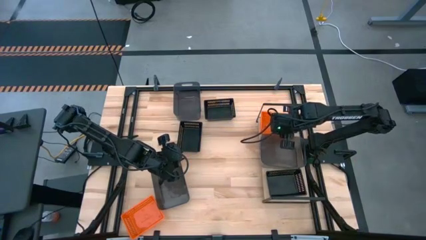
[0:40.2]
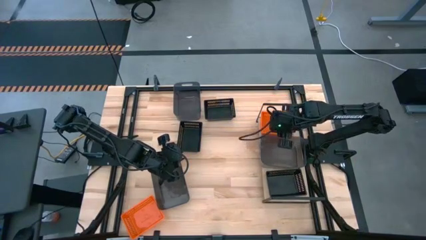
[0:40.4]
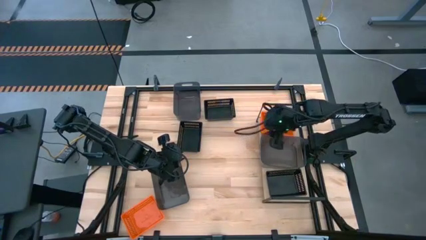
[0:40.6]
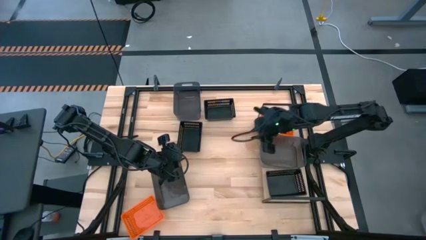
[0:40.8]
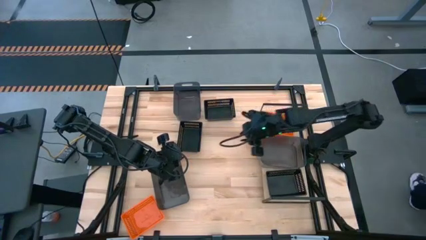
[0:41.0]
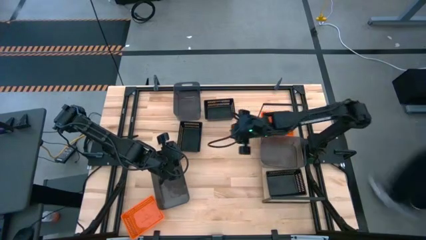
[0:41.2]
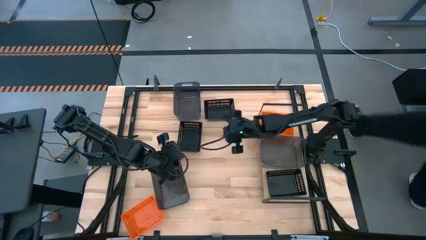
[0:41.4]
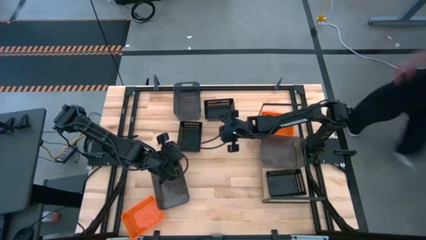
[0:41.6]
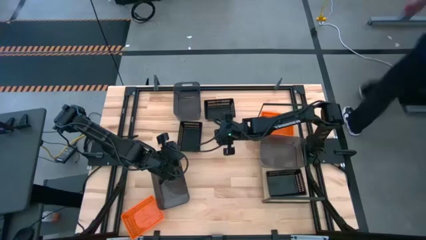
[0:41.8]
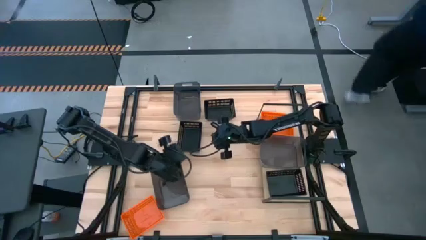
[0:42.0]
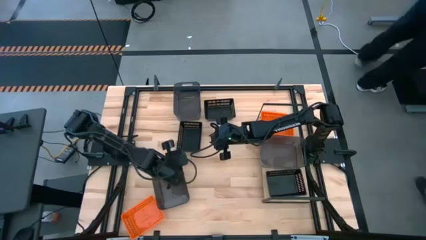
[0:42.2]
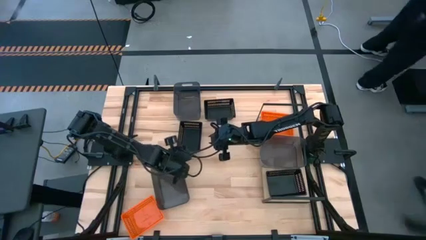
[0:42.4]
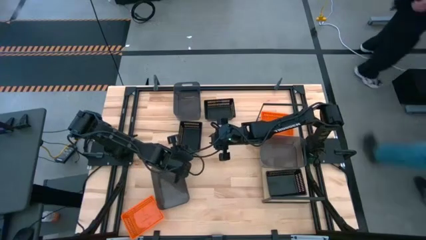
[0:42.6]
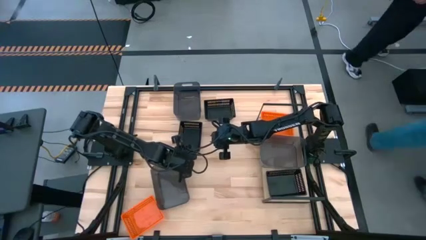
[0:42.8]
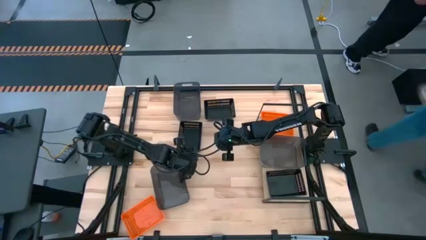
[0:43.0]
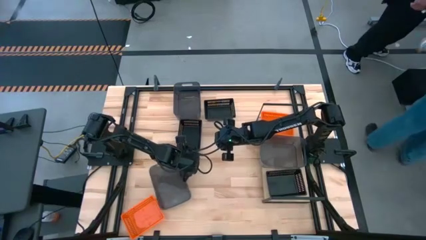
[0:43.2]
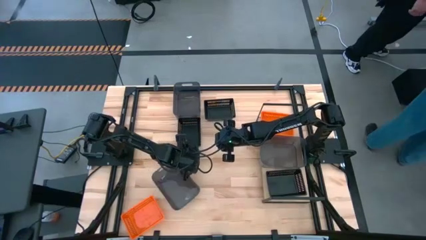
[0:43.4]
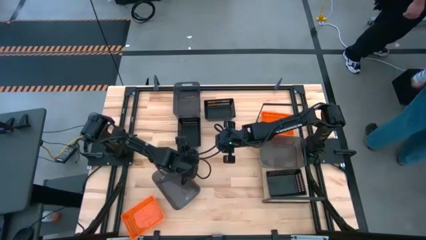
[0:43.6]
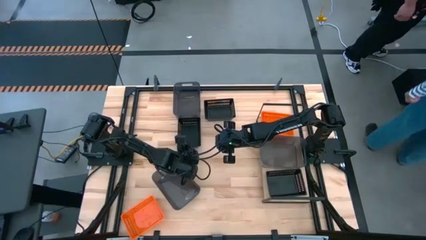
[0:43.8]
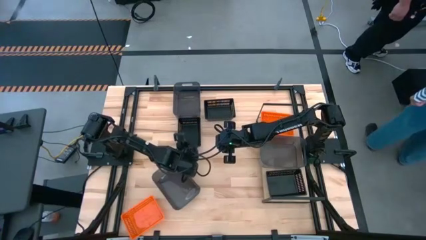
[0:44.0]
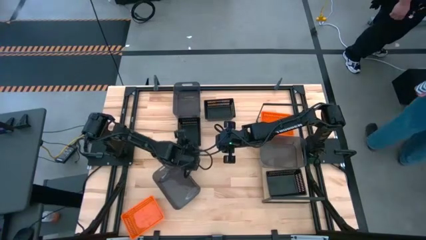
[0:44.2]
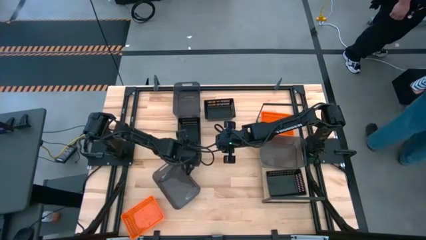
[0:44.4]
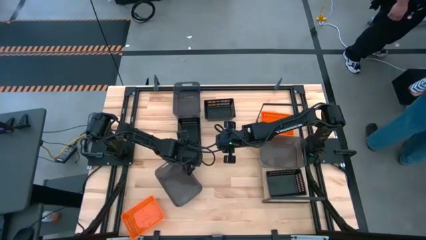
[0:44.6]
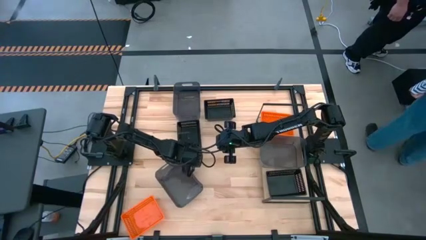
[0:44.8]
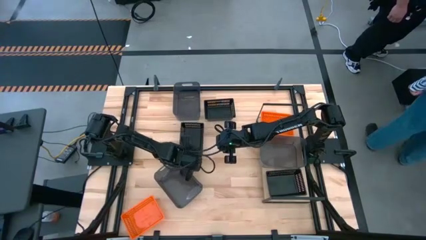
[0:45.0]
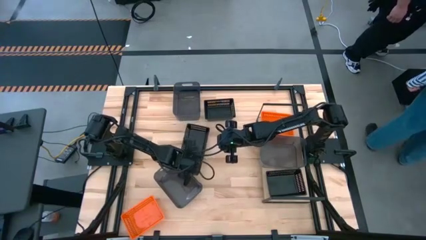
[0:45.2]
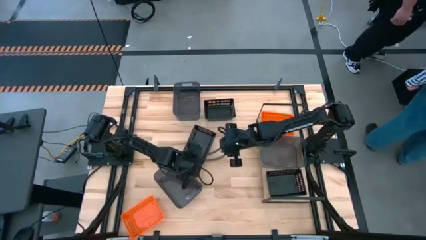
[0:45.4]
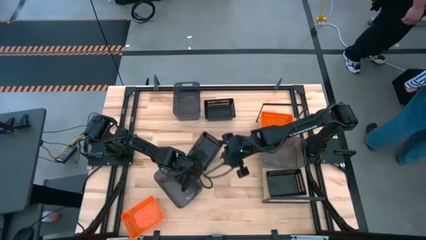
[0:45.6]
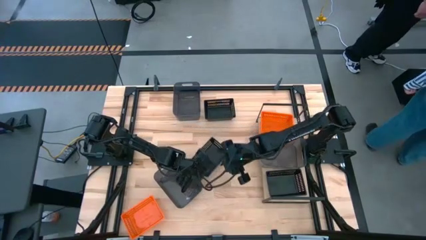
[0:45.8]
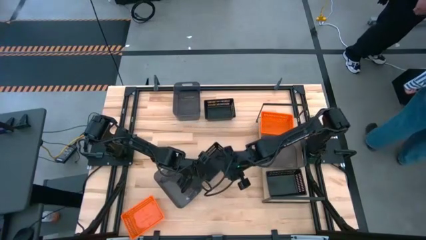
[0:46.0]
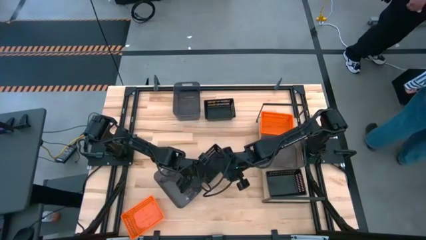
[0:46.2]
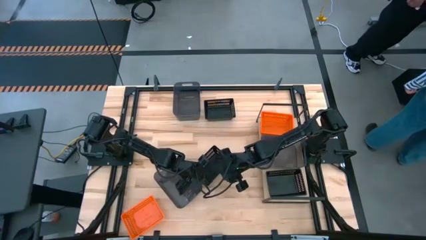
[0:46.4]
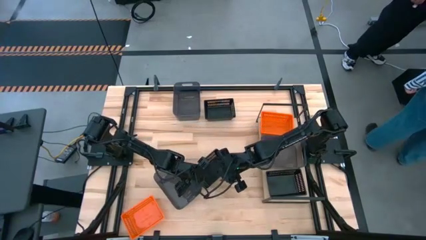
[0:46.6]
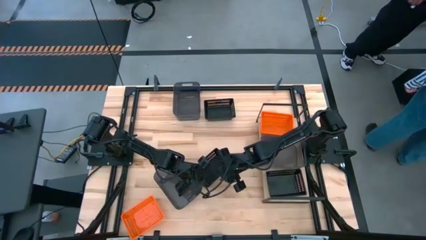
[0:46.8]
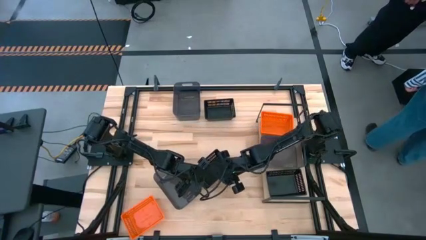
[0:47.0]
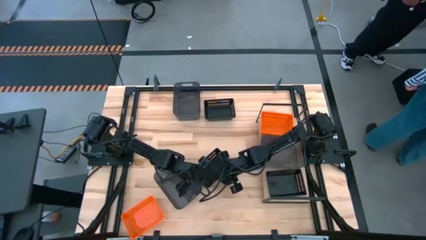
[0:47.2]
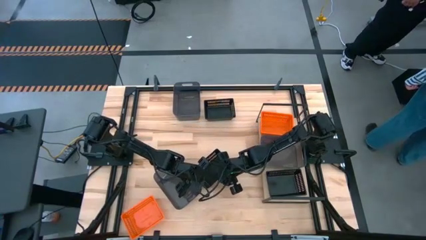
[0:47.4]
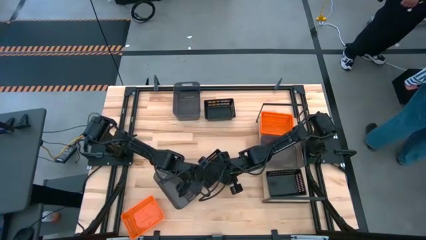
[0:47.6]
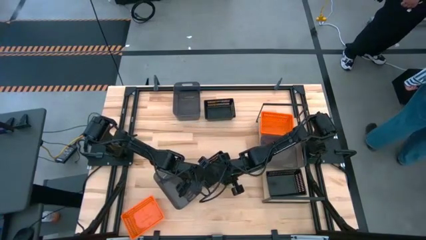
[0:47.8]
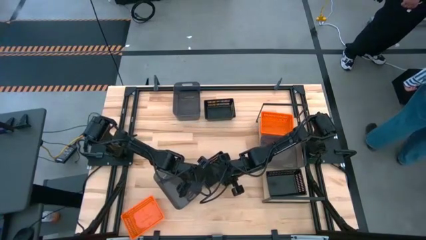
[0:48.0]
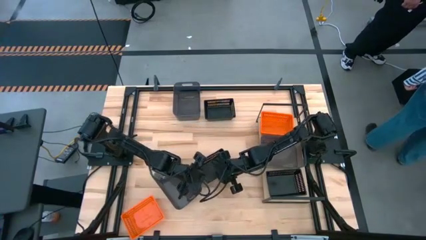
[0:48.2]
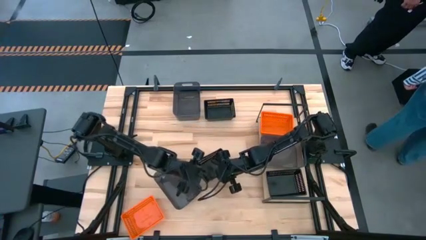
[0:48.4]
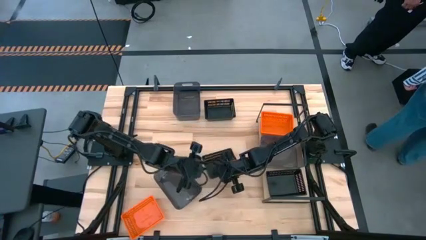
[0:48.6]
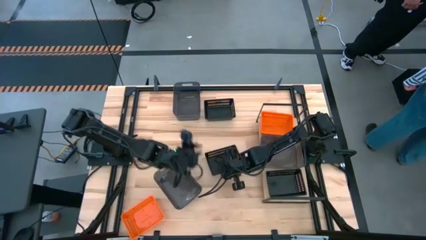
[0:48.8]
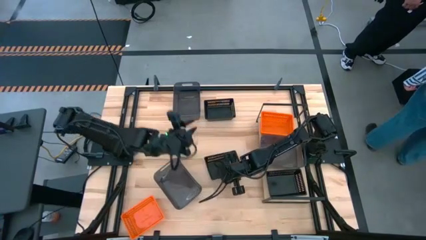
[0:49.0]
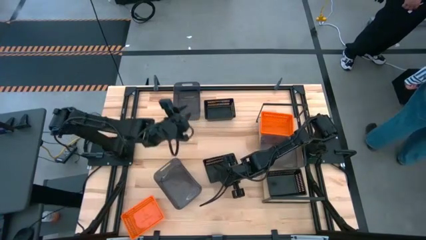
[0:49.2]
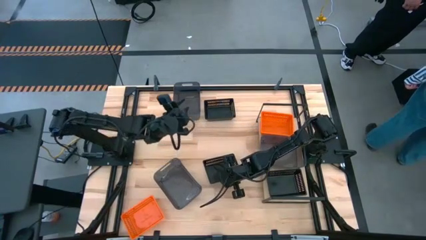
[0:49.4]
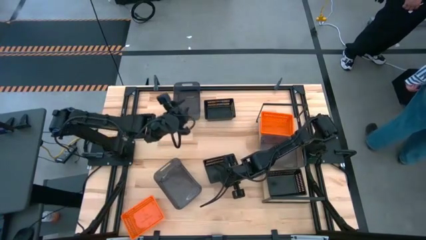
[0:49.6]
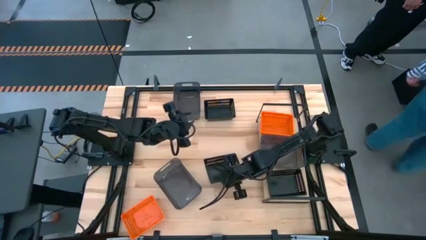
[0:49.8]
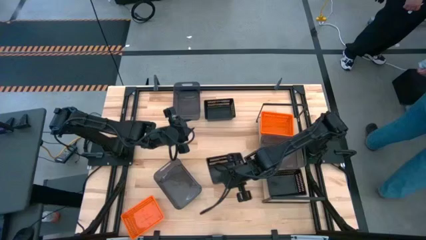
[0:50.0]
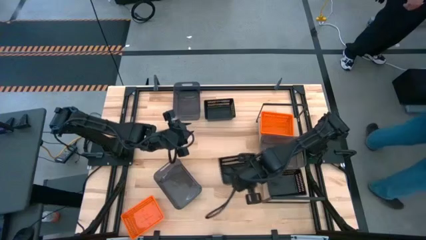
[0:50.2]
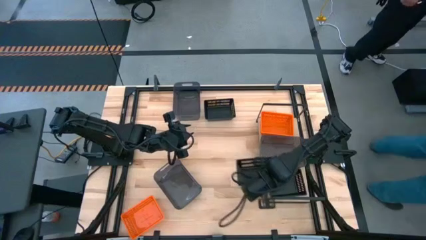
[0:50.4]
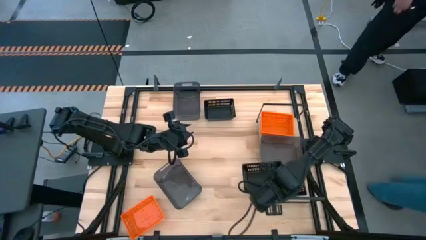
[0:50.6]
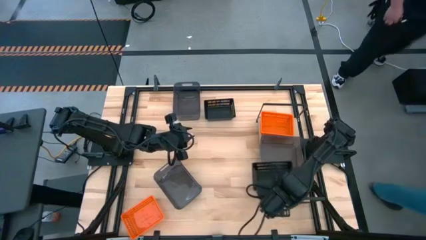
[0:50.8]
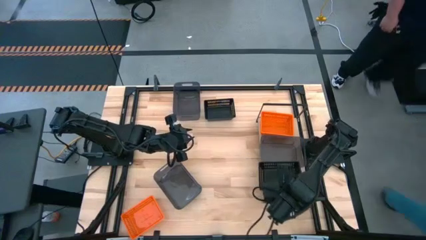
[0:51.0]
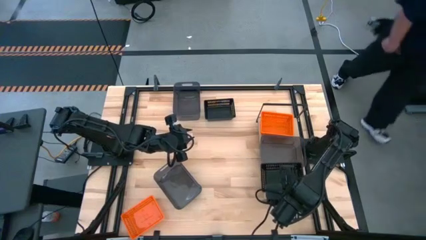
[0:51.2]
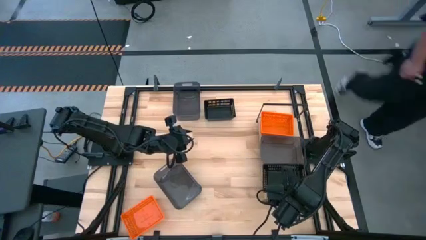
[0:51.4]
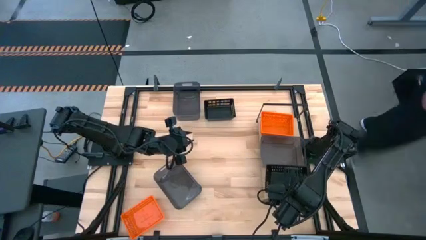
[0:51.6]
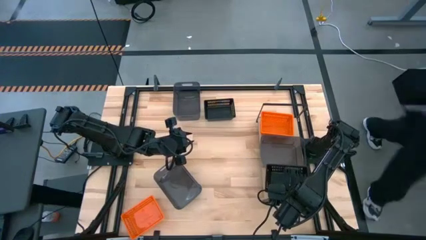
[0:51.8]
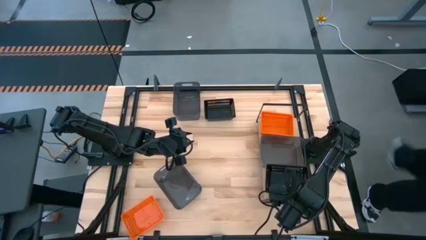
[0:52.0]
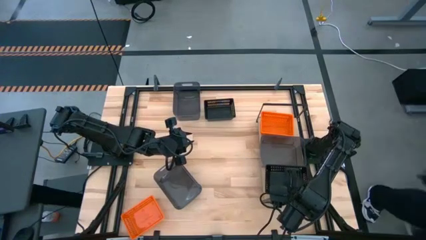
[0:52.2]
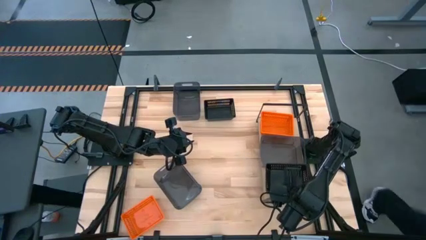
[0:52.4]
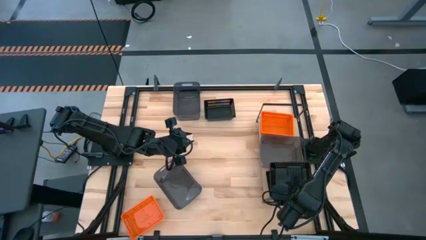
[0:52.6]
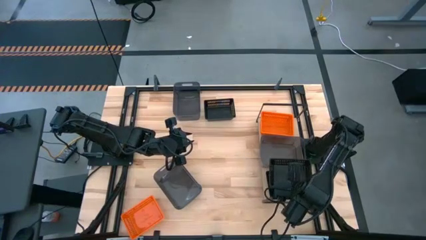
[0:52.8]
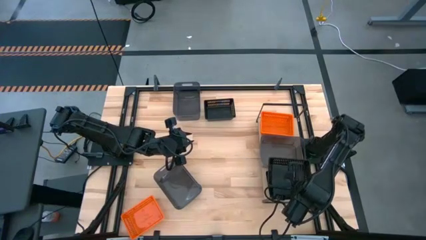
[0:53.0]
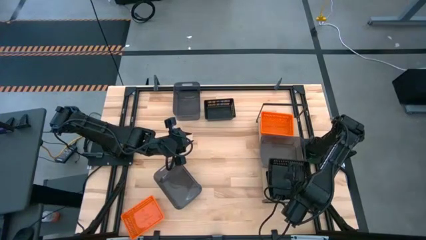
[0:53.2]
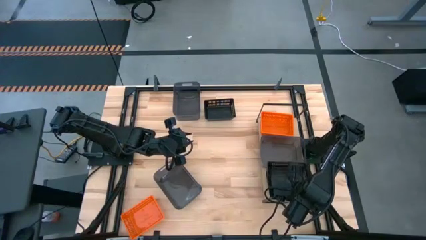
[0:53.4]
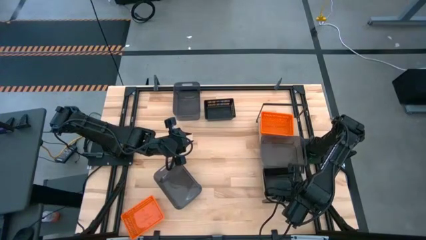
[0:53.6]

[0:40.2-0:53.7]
Task: Stack baskets on shelf by color
Stack bottom black bin on top of the black bin on the shelf
